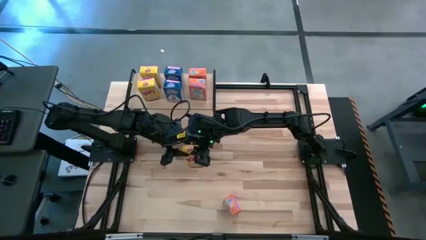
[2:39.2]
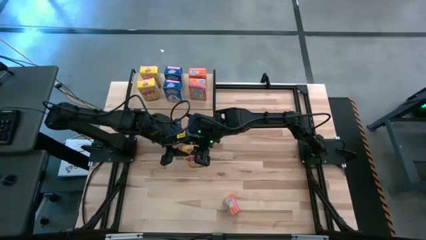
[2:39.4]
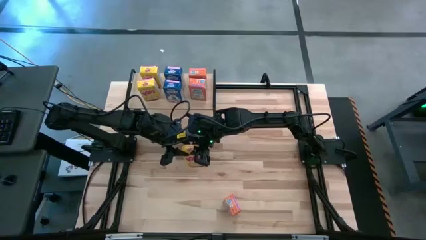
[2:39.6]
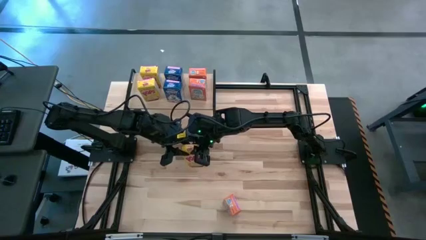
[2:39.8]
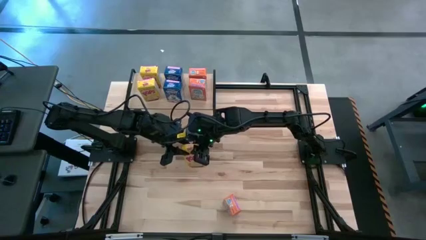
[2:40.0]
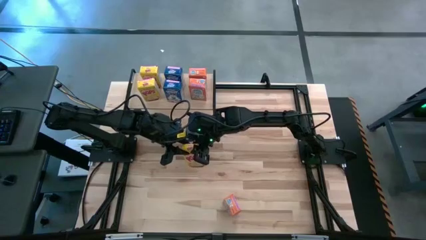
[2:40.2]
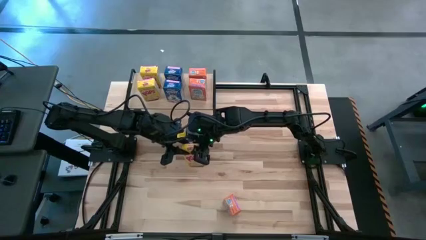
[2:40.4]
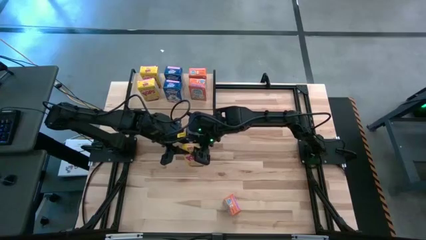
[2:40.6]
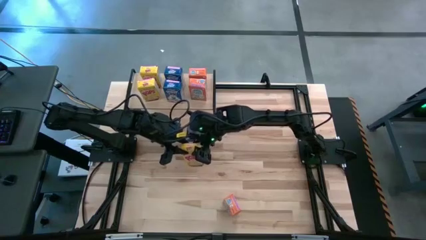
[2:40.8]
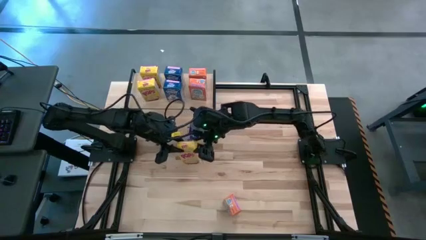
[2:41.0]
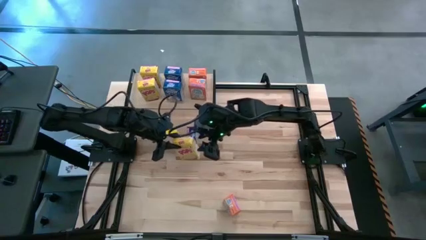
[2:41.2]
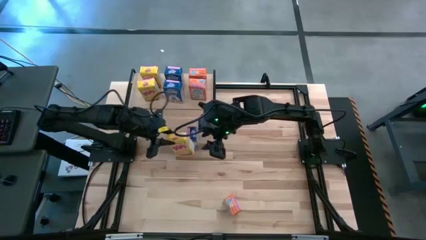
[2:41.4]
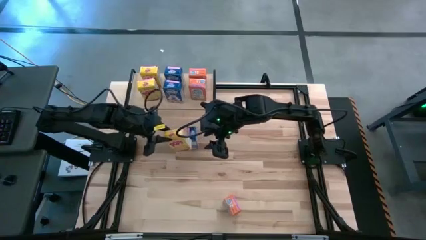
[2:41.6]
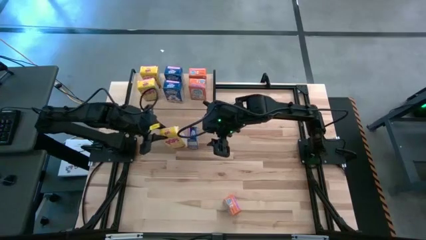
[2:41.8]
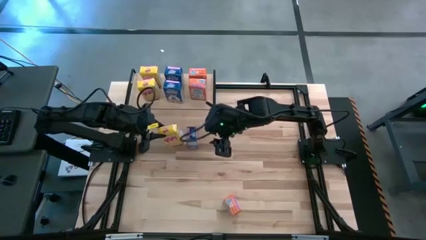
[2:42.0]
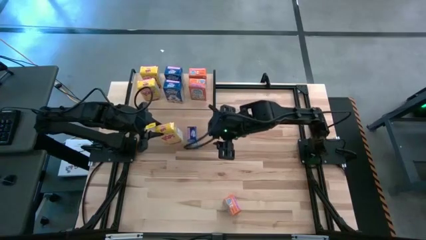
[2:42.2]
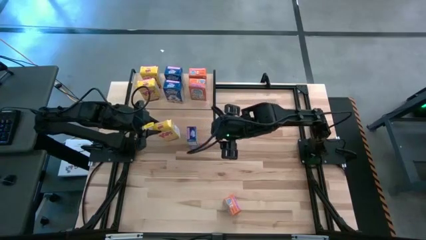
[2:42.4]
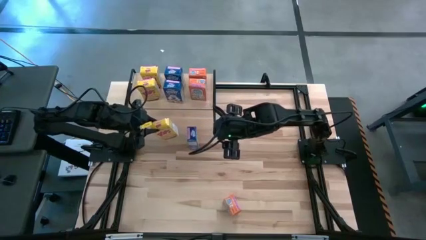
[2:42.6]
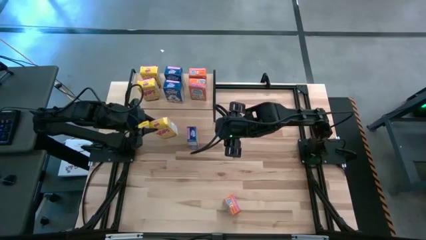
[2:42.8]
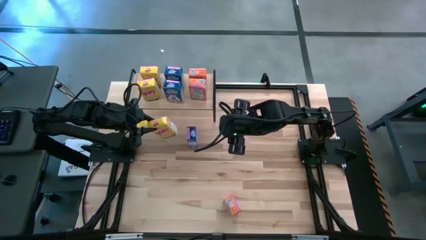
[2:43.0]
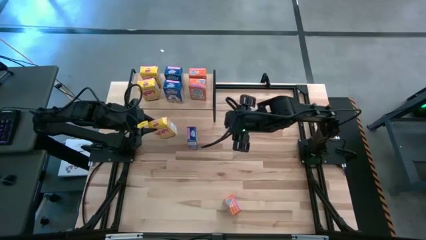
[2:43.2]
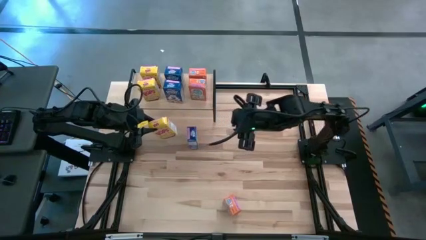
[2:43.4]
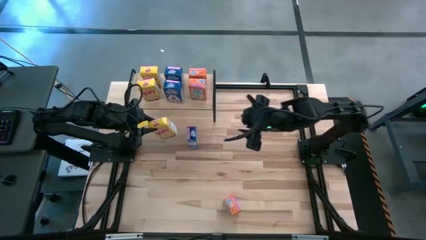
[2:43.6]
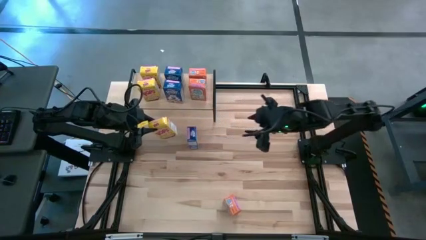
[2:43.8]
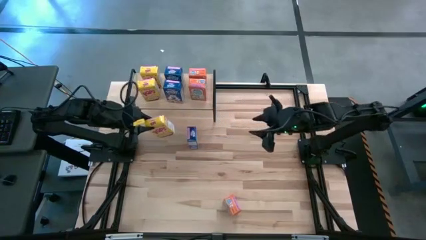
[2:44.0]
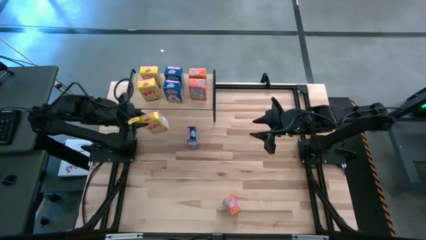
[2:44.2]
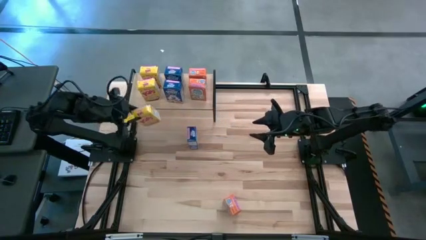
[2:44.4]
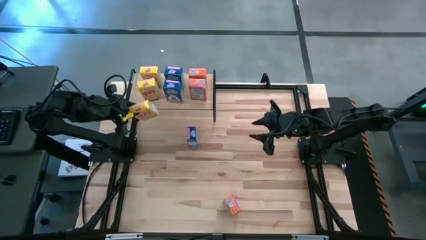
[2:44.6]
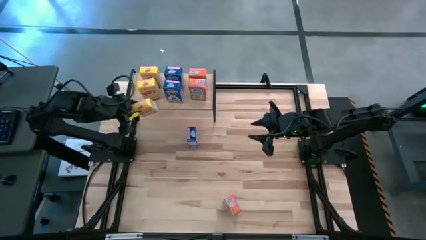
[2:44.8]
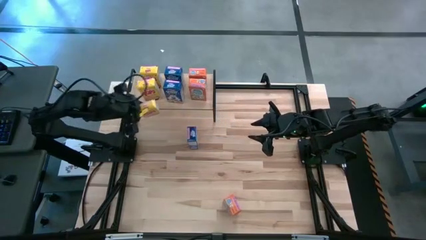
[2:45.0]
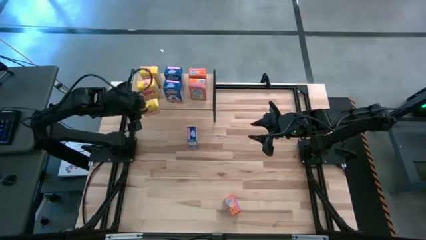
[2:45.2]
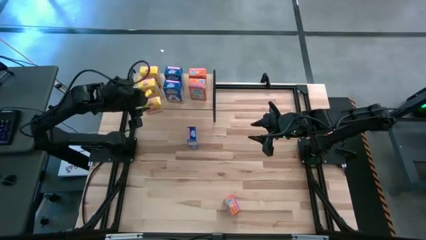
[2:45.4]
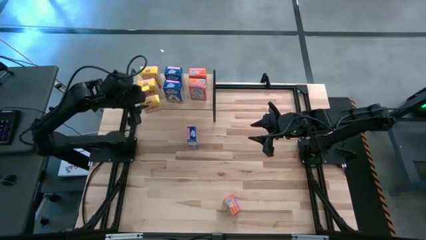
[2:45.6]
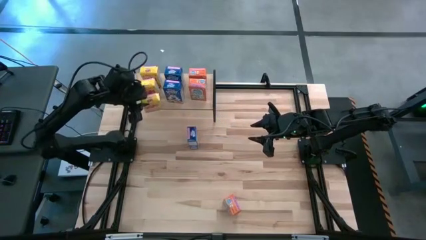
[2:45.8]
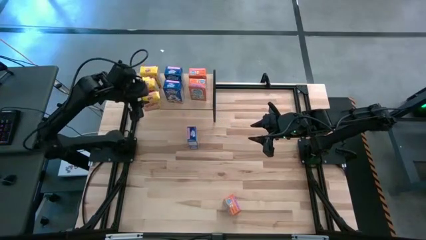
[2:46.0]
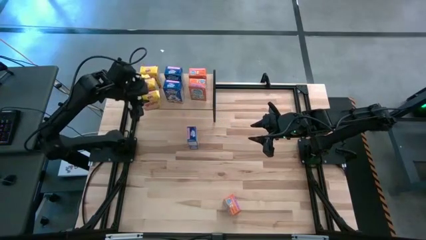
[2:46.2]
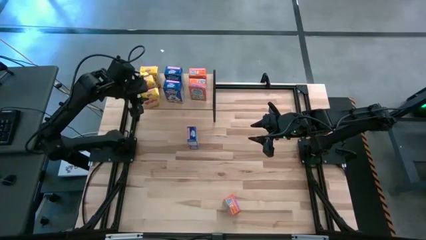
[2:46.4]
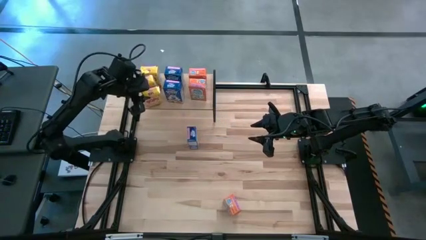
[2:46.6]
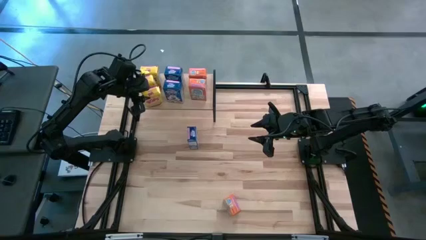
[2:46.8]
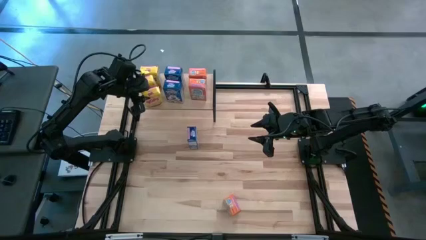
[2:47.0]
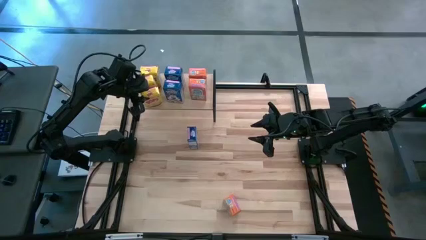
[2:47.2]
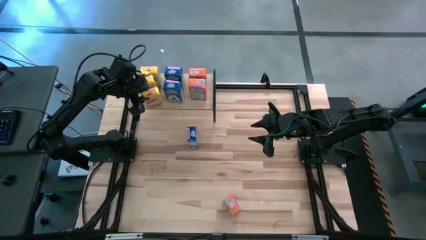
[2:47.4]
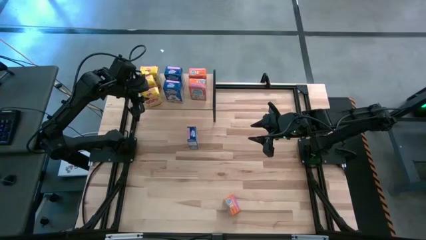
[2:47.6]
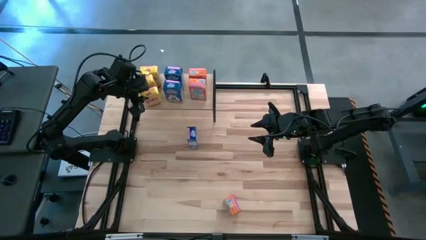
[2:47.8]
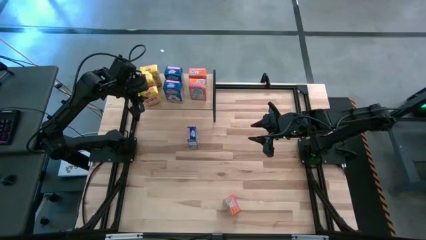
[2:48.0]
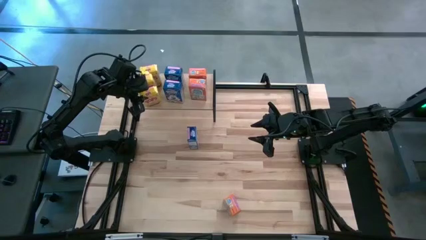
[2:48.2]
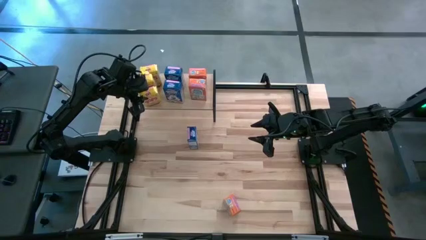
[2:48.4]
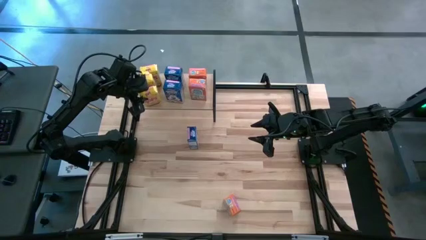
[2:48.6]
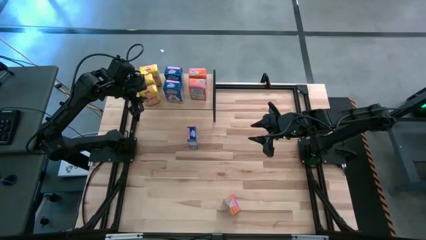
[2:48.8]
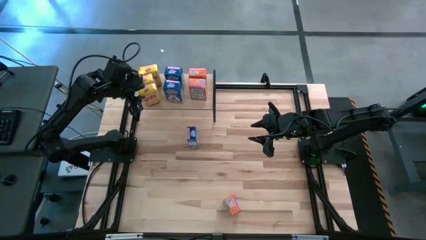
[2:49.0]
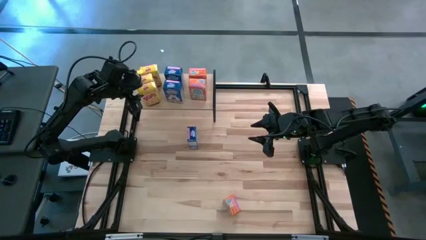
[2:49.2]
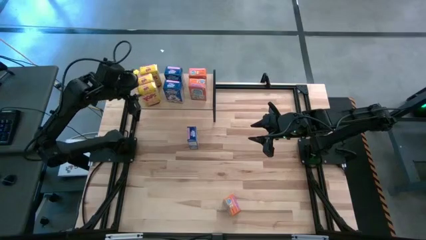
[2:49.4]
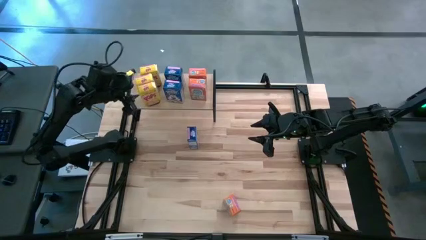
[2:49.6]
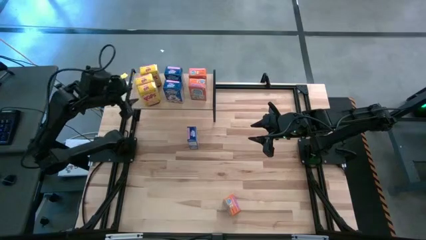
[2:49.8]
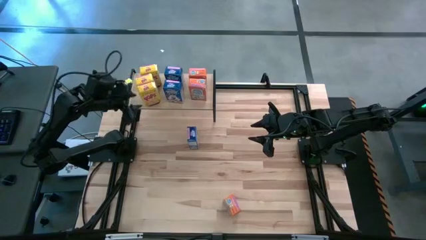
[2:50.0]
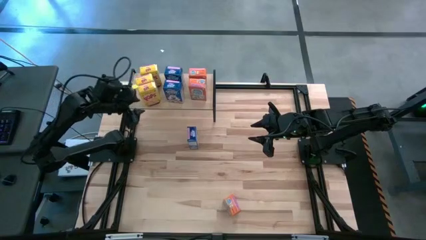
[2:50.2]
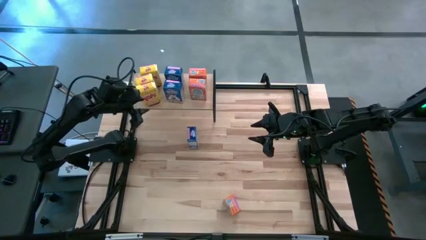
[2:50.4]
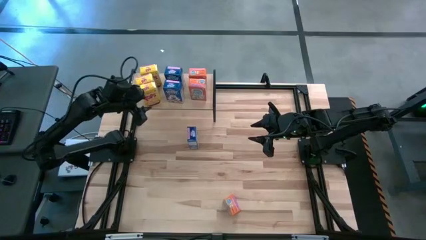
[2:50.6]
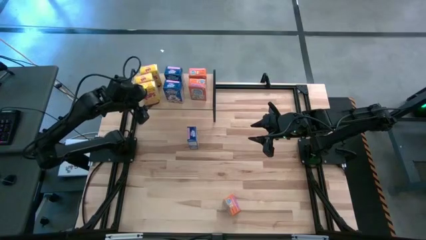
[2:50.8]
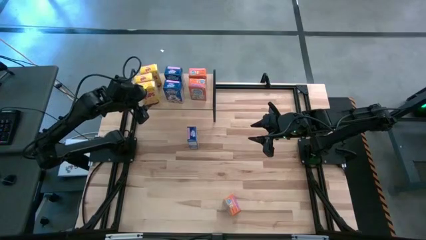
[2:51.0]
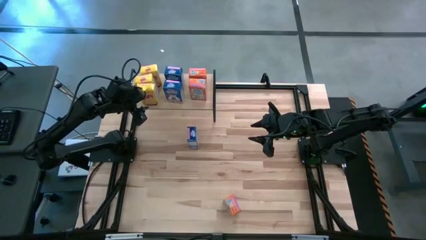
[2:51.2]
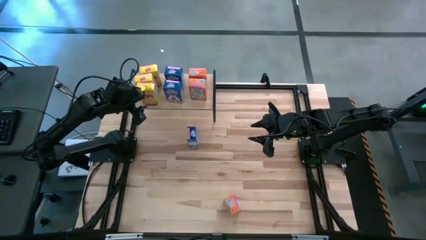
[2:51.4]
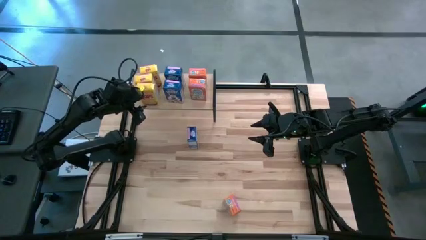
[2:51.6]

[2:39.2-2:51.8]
Task: Stack cereal on shelf
Put the yellow cereal box on the shelf aligned with the other yellow cereal boxes

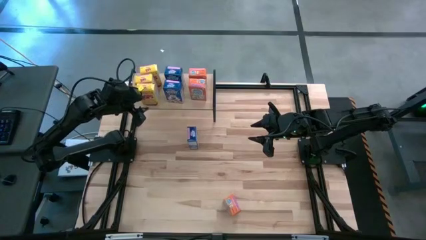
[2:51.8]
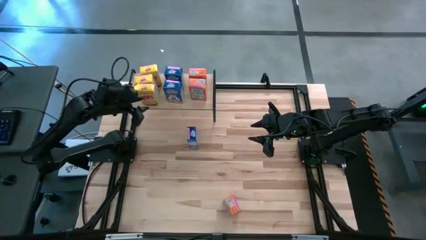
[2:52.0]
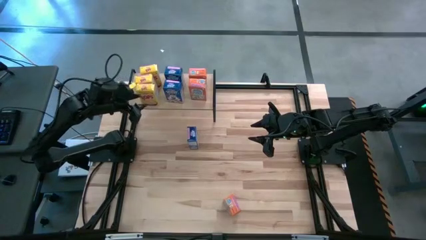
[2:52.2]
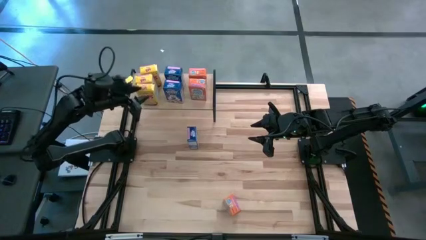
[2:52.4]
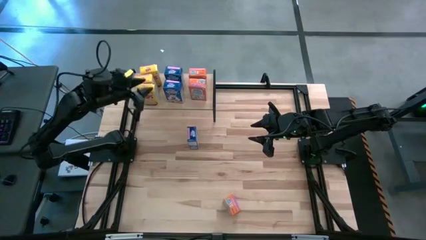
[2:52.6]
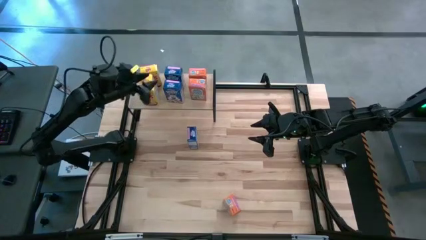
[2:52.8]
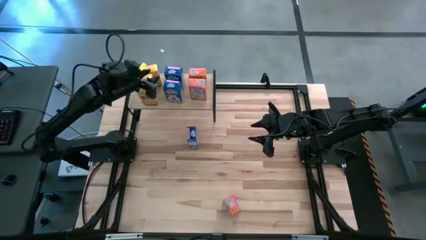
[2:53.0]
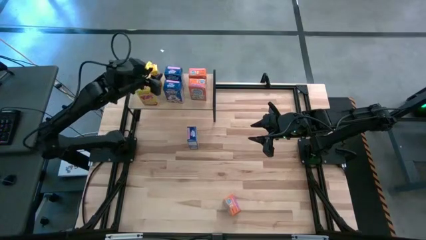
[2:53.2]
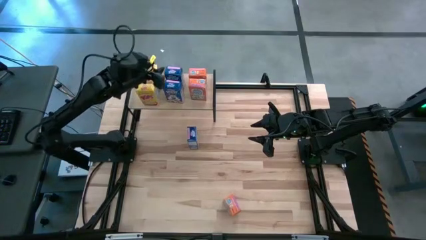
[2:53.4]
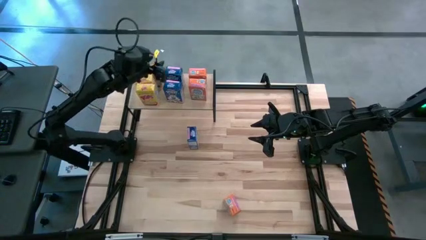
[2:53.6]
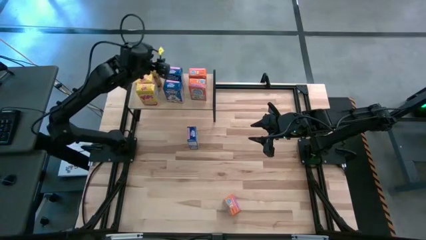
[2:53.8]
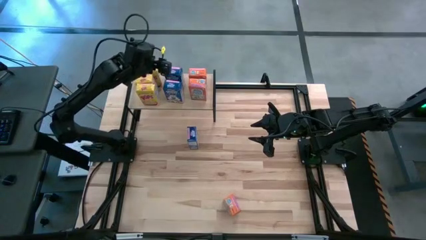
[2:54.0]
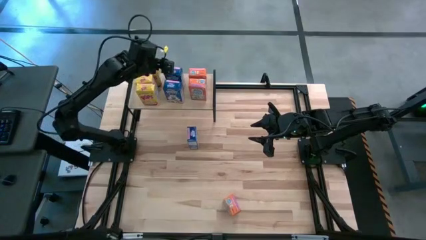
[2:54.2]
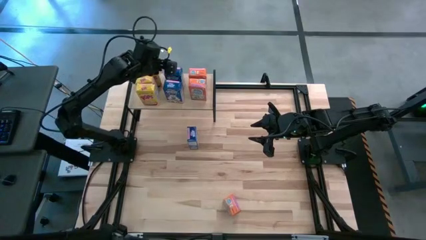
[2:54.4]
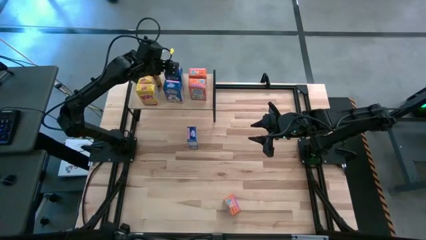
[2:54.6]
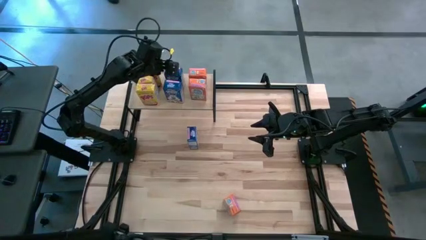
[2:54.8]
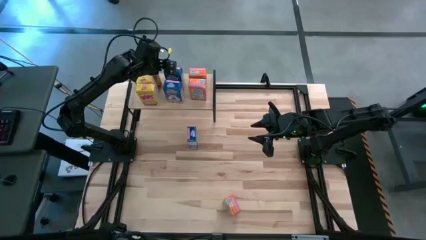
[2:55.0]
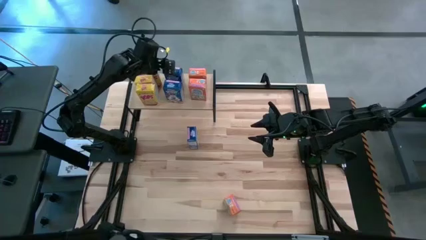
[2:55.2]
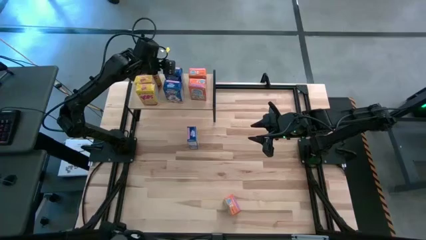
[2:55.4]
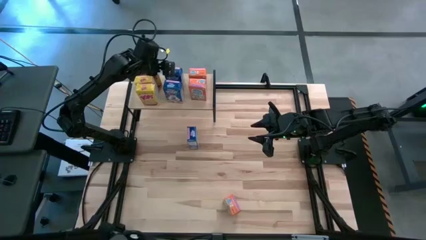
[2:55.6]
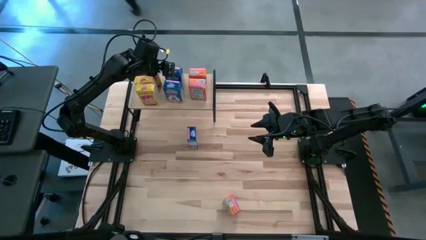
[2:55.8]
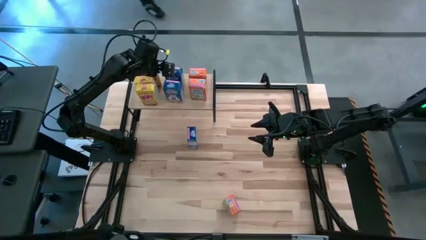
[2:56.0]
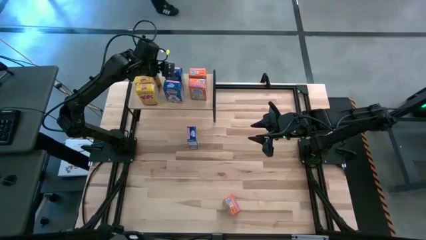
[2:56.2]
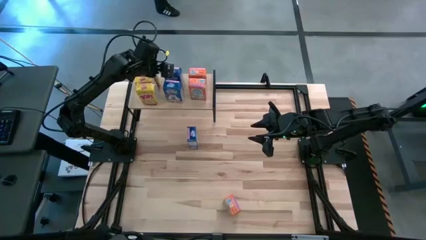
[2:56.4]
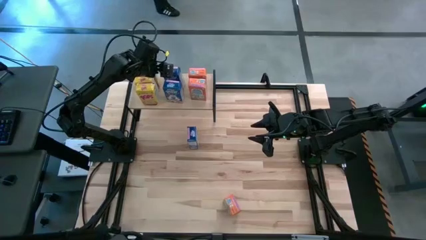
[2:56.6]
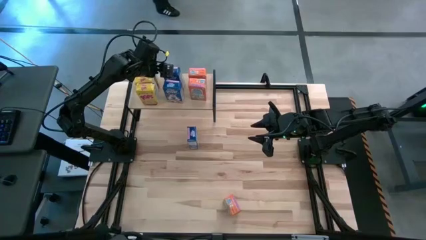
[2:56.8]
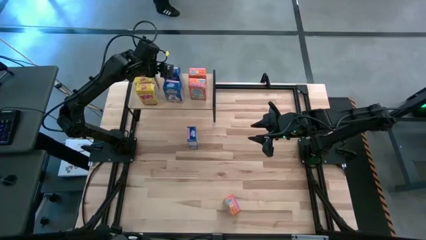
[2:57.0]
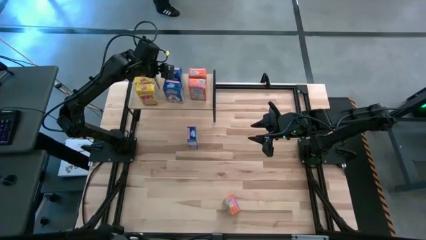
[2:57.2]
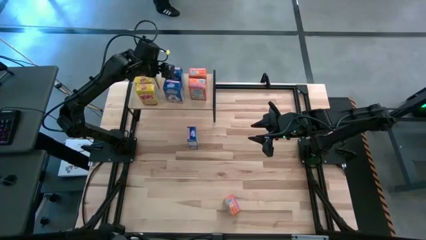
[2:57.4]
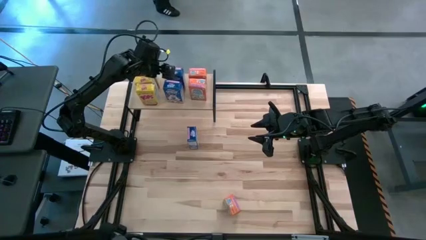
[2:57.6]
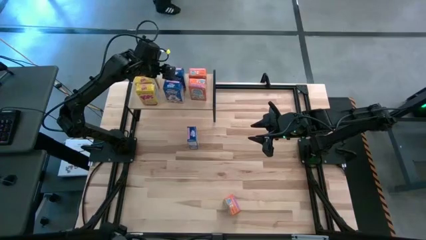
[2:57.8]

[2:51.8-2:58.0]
Adjust the top blue cereal box on the shelf
